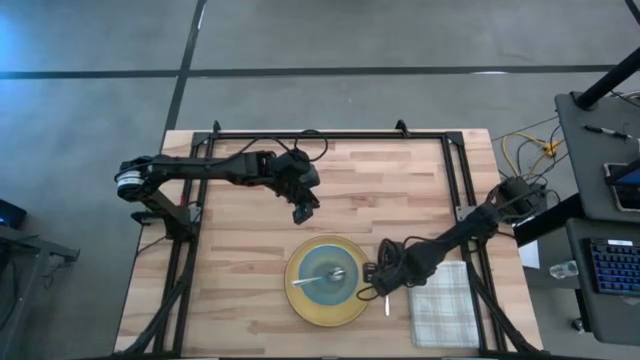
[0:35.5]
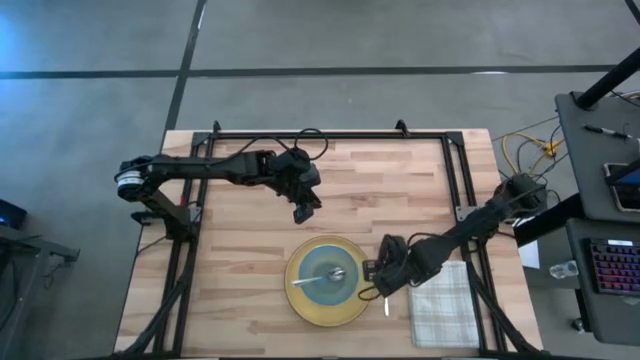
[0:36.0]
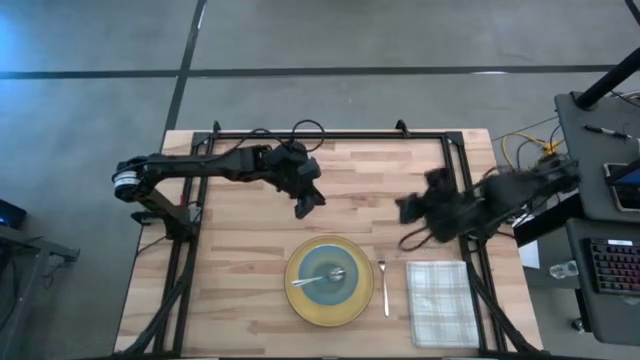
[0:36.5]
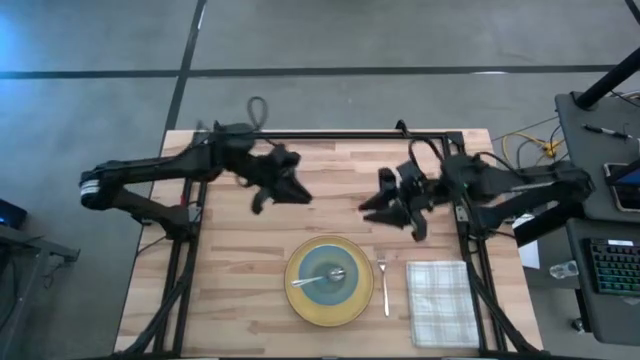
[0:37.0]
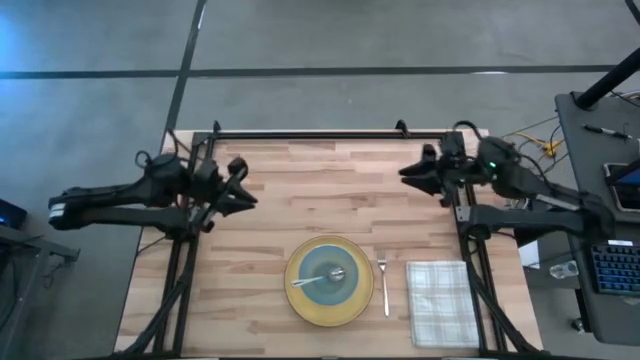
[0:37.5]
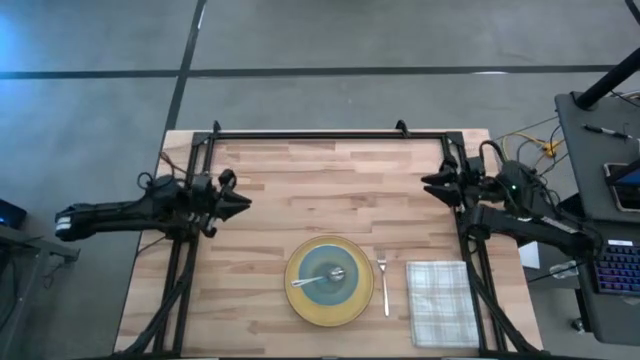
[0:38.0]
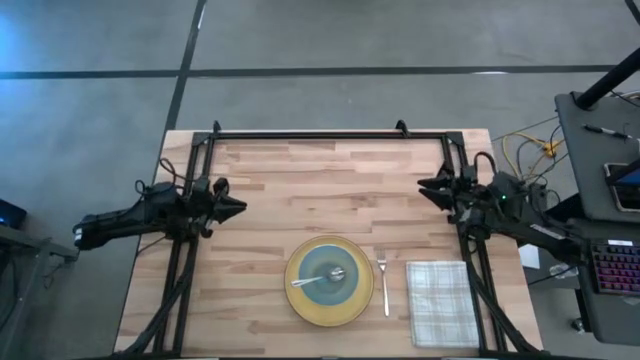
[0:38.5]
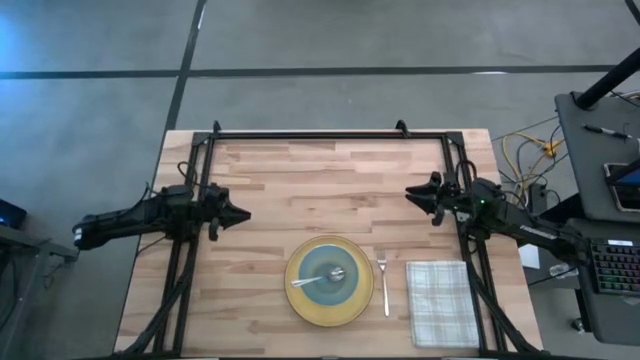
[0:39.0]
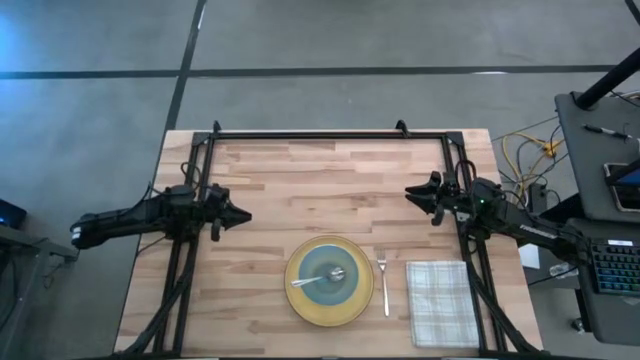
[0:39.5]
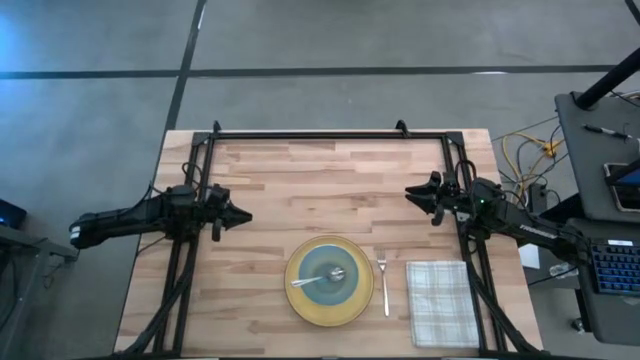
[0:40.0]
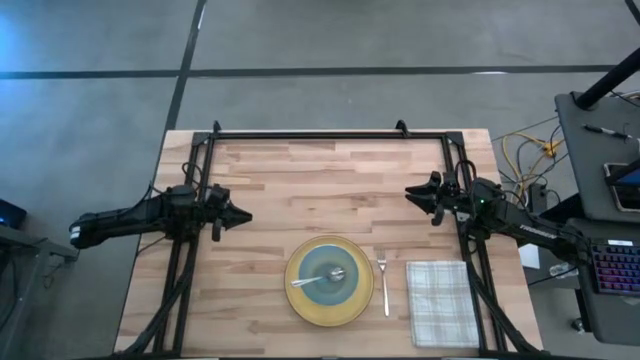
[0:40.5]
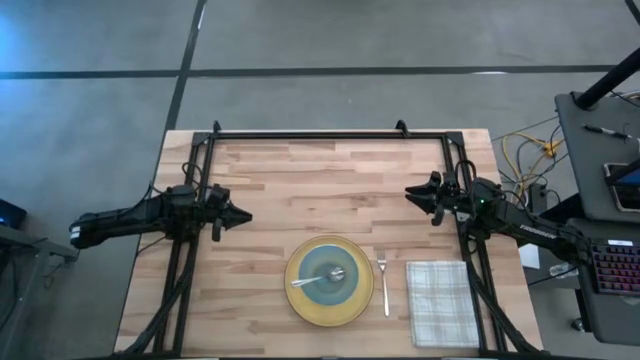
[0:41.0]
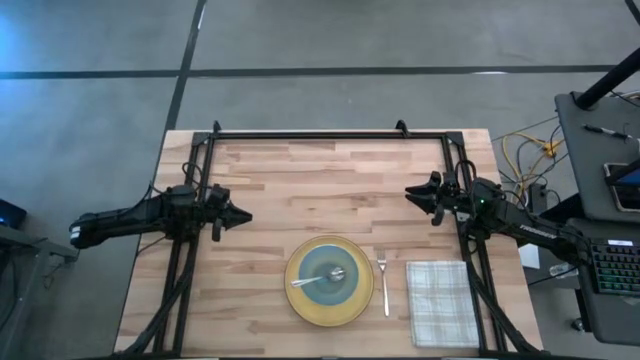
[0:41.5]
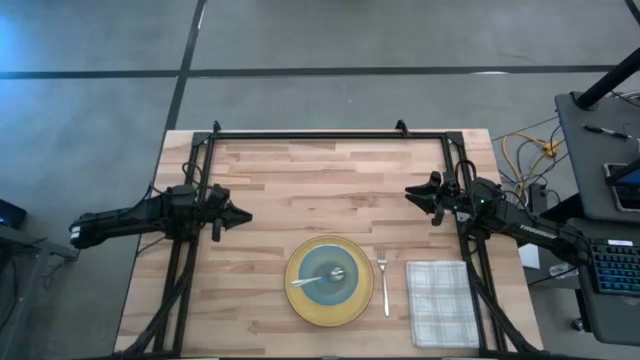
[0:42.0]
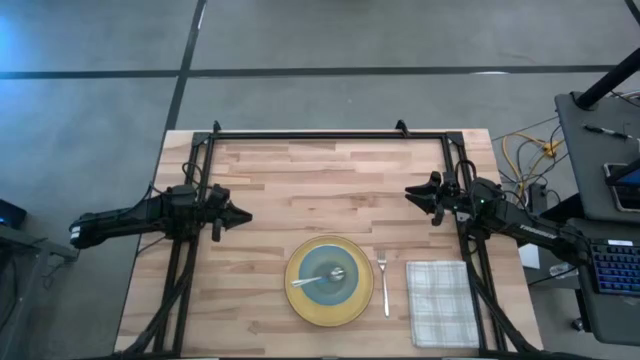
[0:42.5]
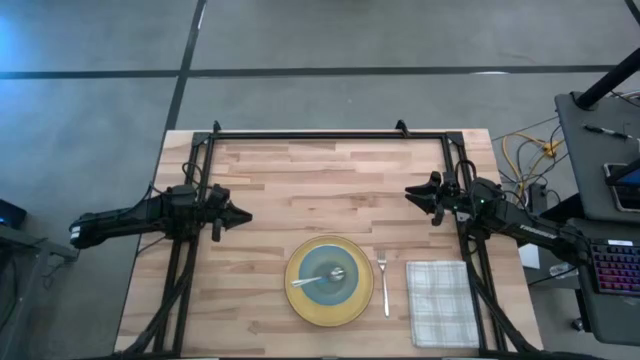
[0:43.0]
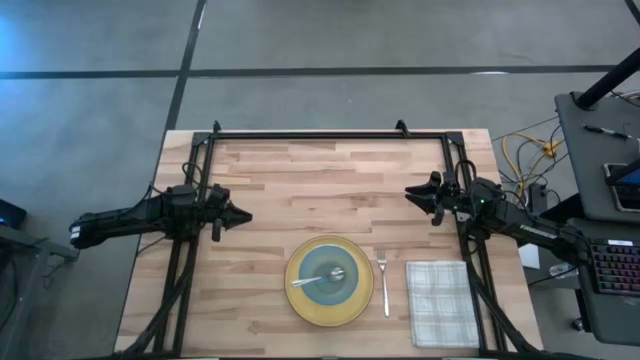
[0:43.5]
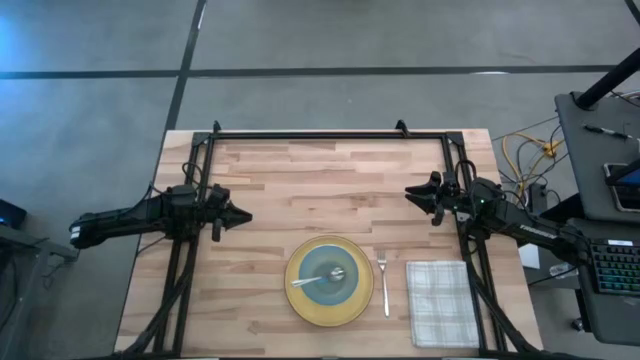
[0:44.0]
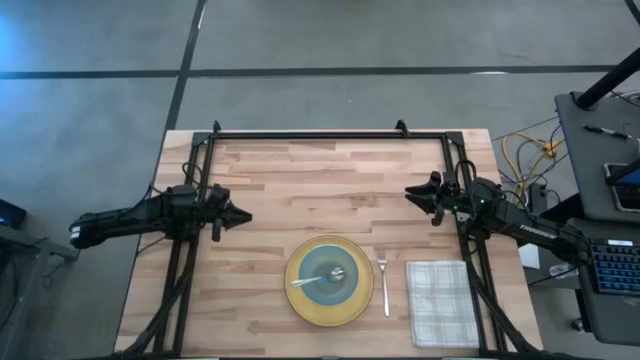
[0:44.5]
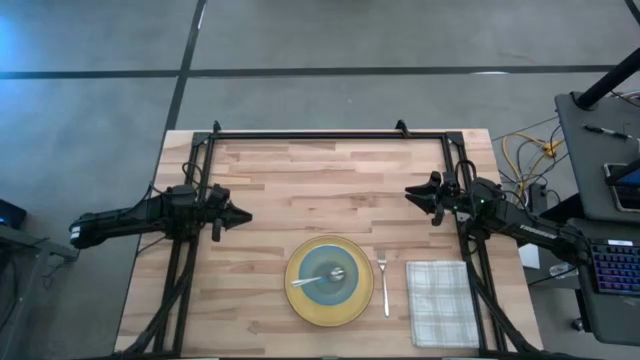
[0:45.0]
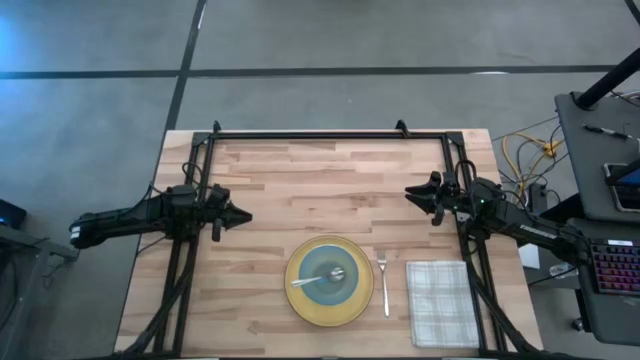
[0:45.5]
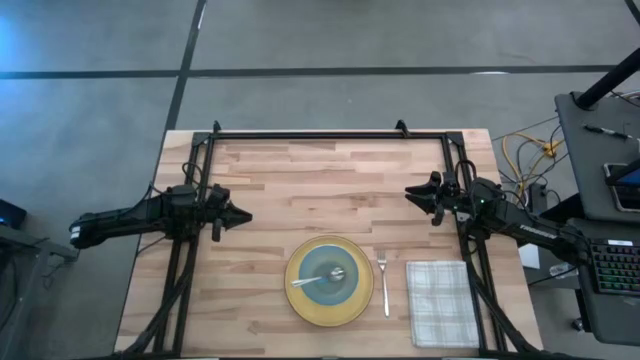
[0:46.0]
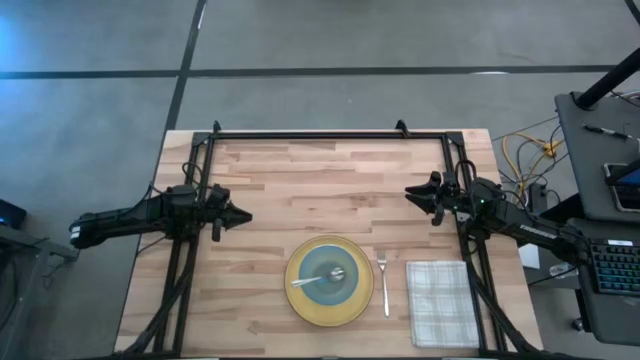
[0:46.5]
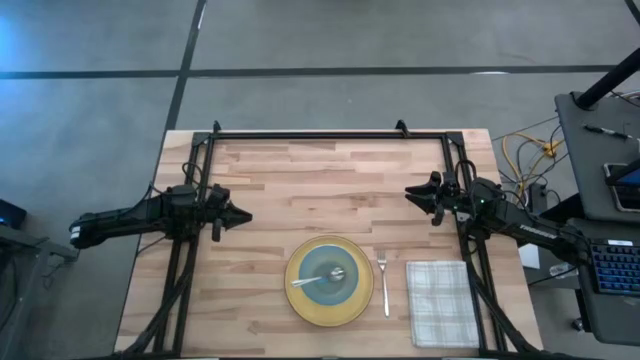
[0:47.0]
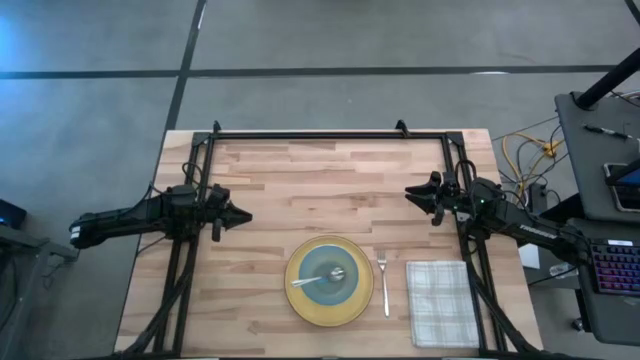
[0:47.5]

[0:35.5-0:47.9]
Task: Set table place
Return to Home Position

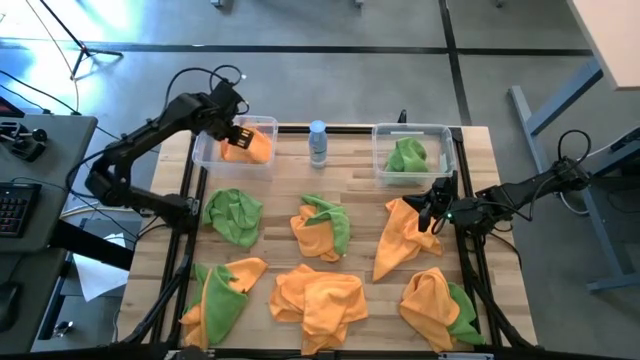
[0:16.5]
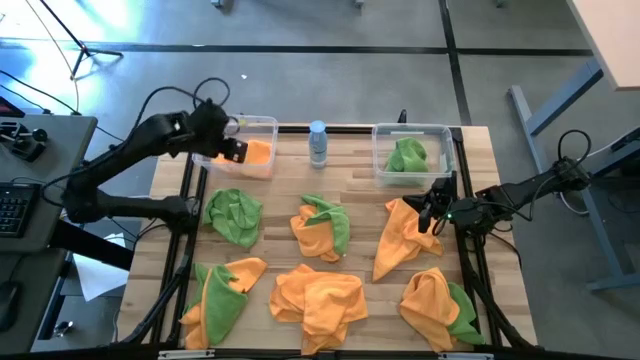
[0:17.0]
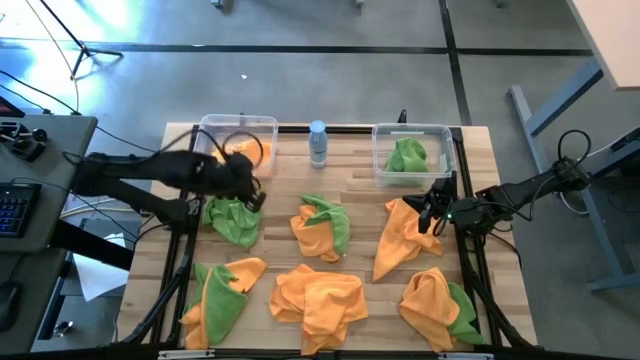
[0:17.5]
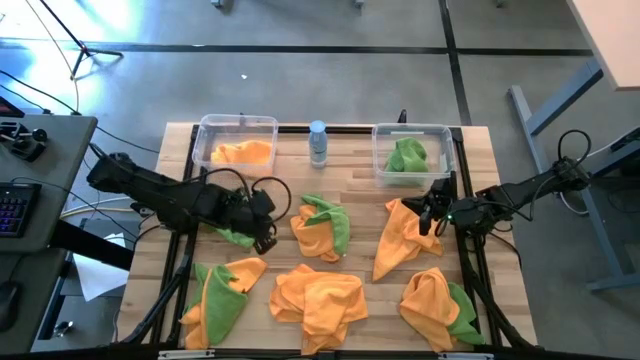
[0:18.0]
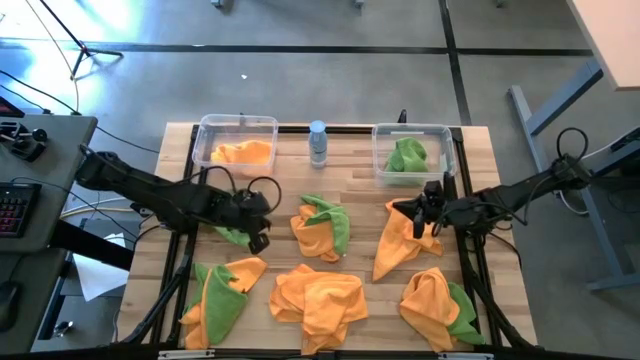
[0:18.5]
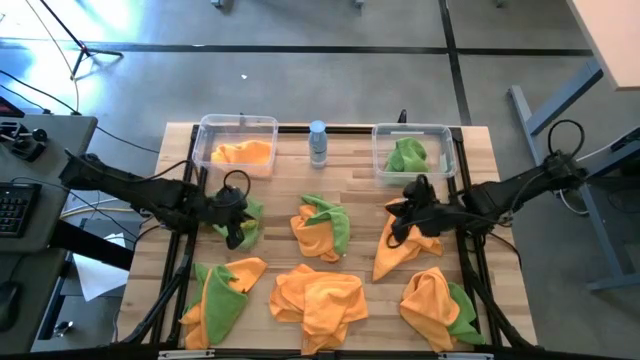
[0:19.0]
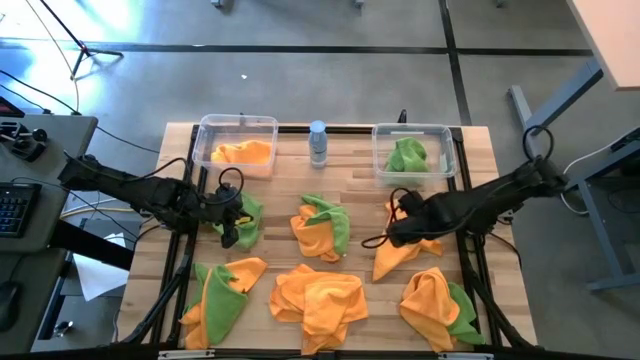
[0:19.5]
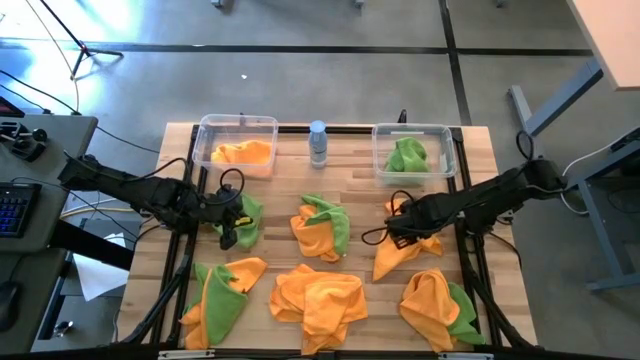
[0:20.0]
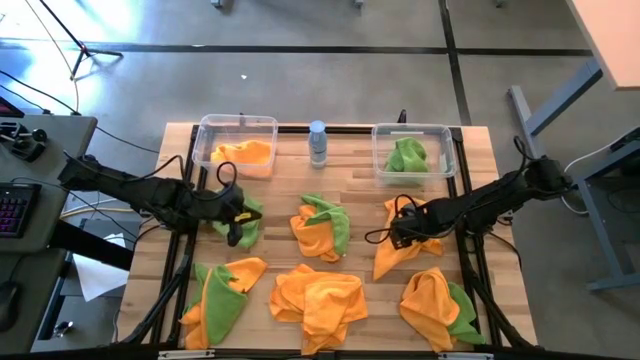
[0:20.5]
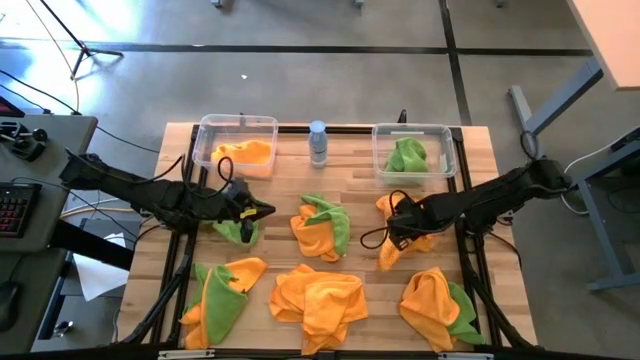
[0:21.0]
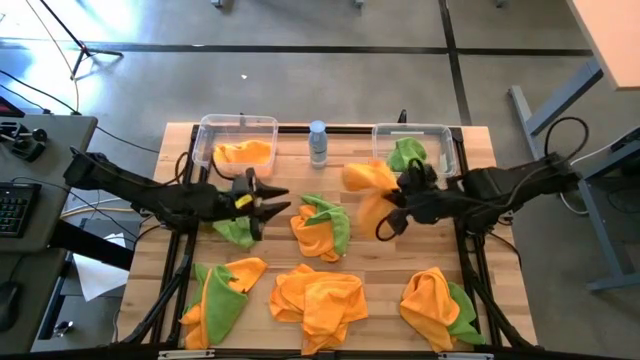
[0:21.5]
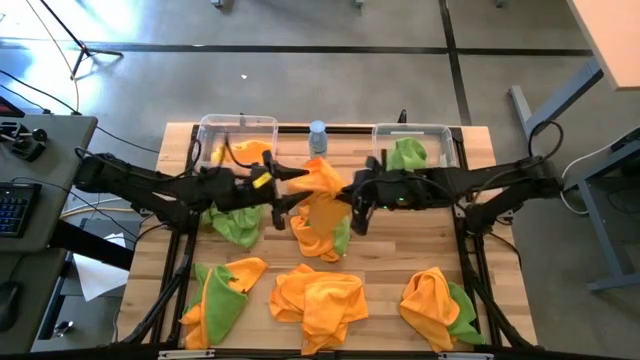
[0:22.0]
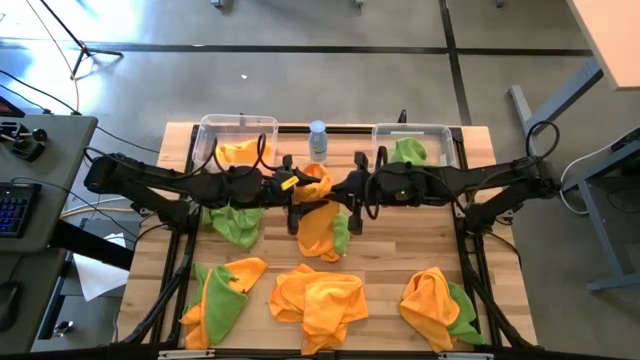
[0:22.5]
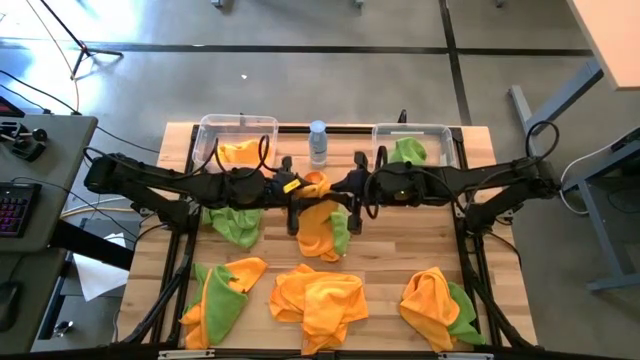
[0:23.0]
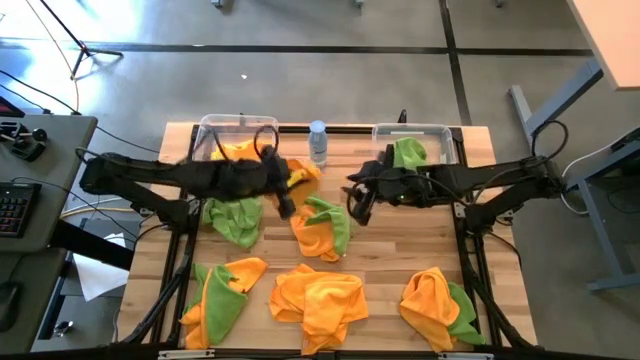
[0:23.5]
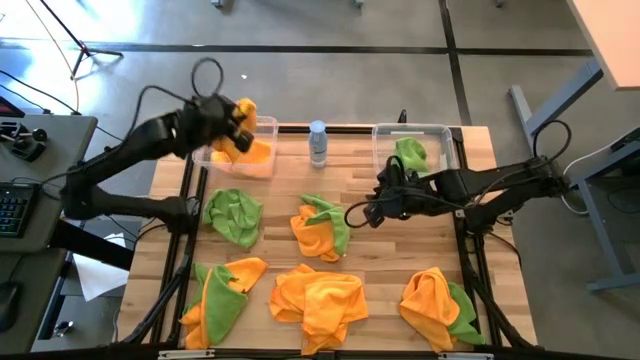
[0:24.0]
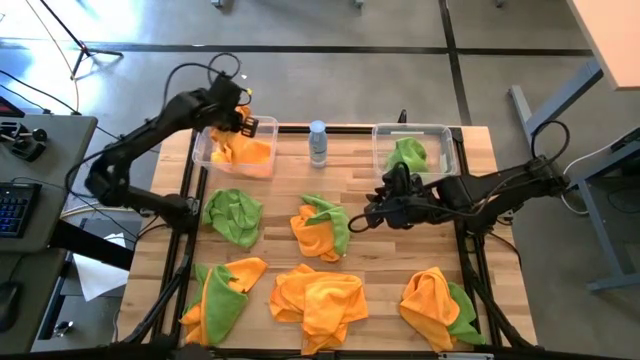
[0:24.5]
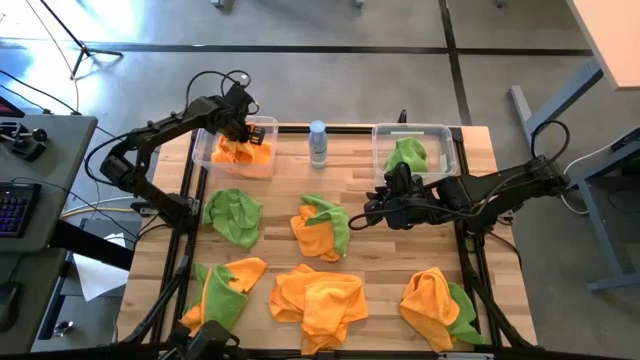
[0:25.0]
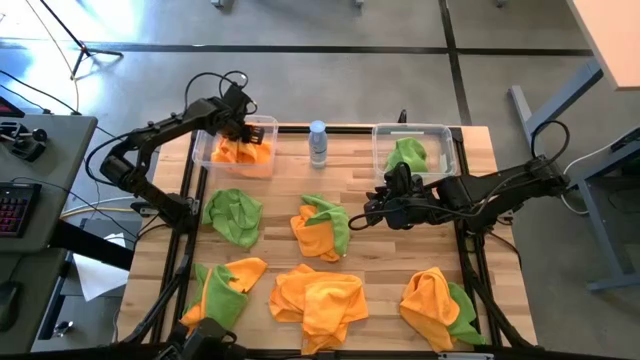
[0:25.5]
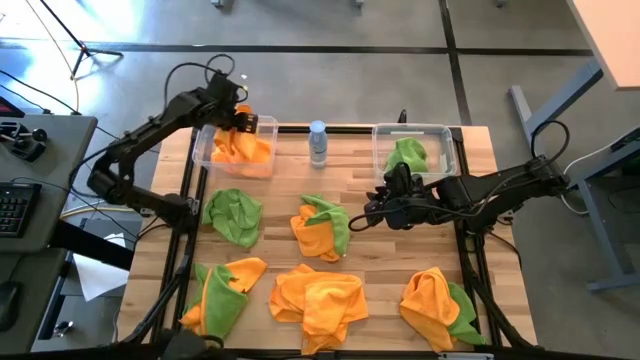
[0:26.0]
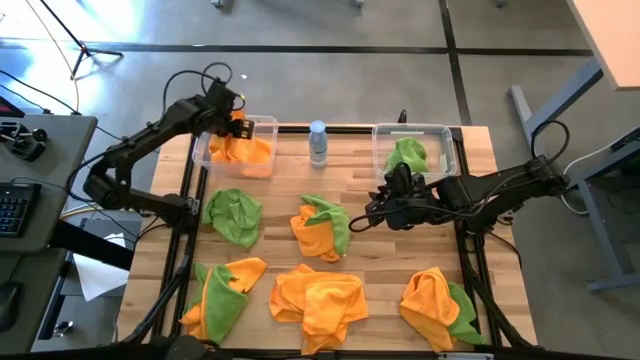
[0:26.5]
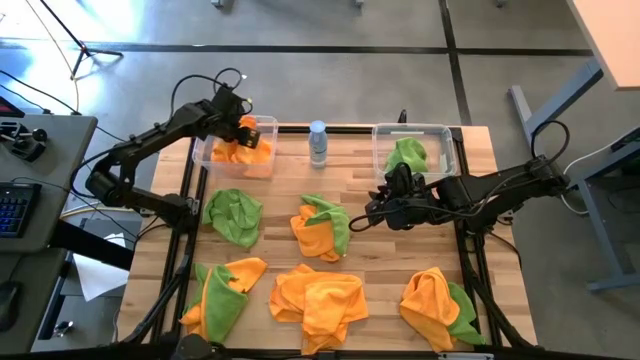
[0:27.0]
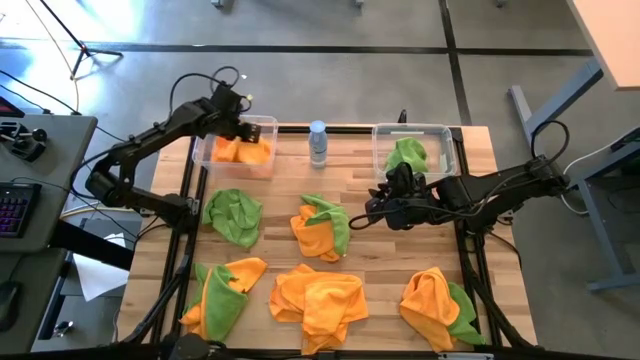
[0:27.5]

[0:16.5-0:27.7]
Task: Sort microfiber towel by color & place in baskets
Put the orange towel into the left transparent bin
